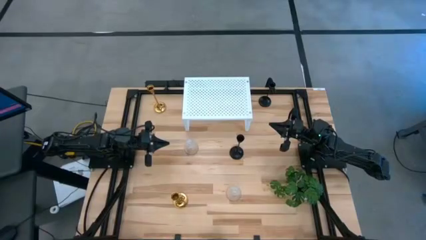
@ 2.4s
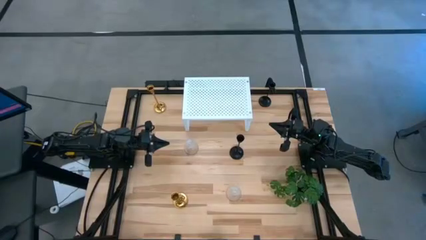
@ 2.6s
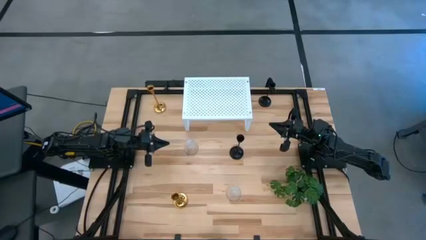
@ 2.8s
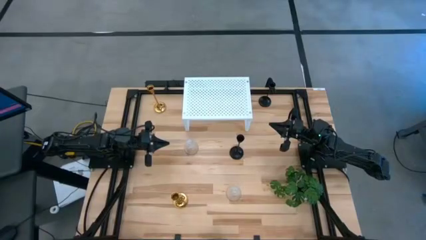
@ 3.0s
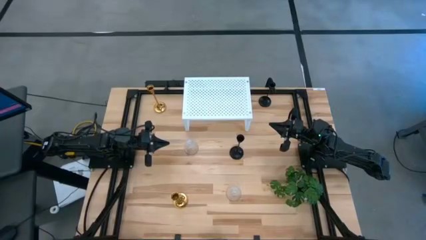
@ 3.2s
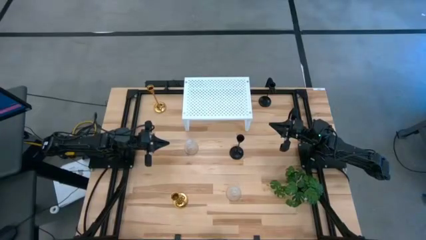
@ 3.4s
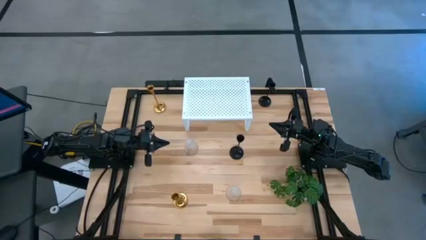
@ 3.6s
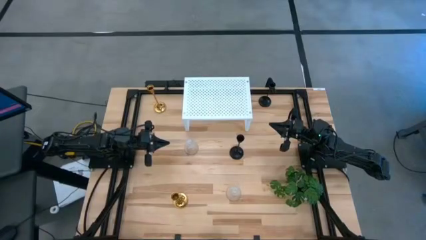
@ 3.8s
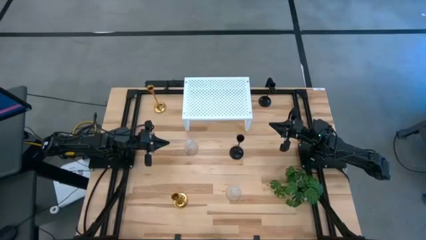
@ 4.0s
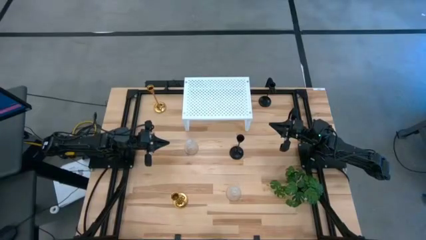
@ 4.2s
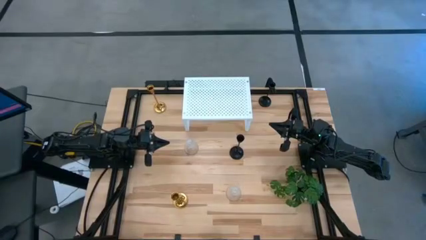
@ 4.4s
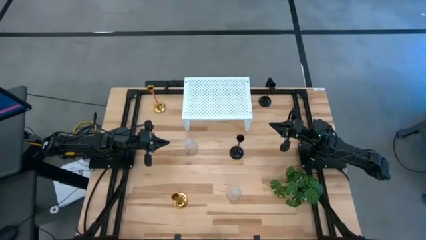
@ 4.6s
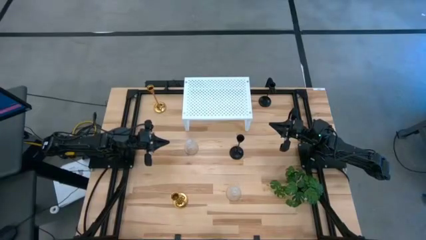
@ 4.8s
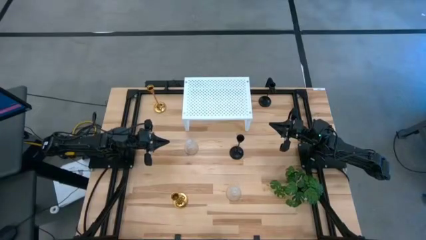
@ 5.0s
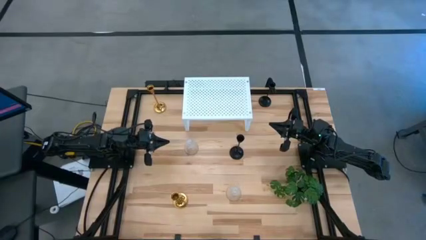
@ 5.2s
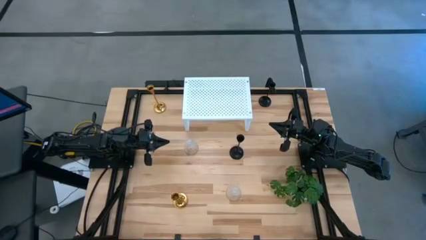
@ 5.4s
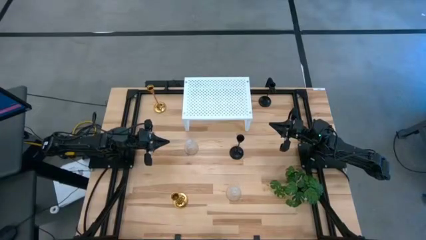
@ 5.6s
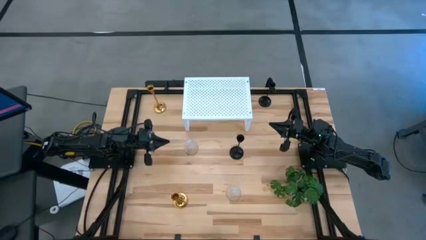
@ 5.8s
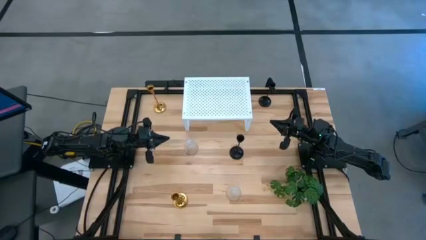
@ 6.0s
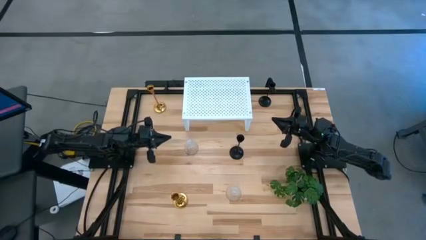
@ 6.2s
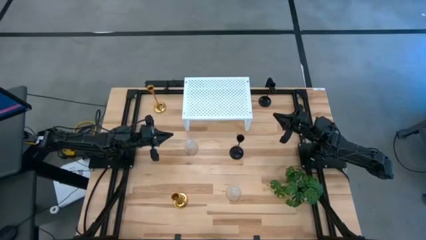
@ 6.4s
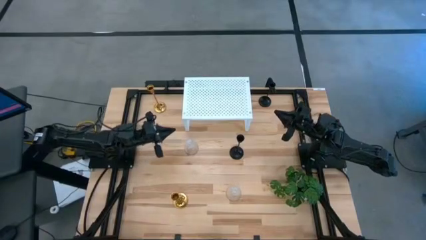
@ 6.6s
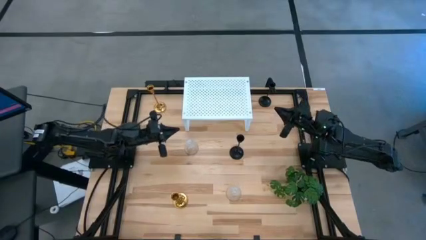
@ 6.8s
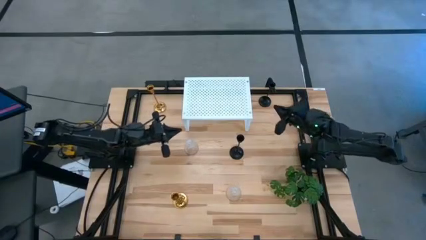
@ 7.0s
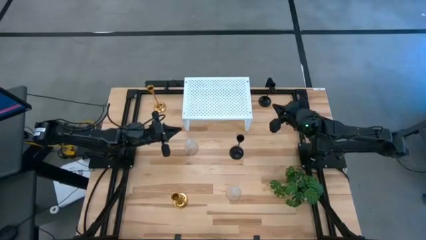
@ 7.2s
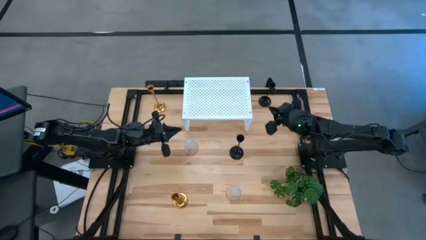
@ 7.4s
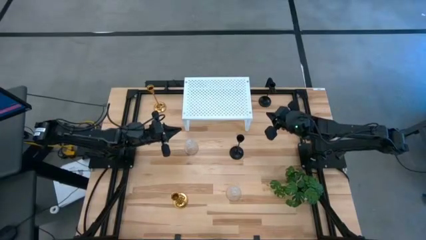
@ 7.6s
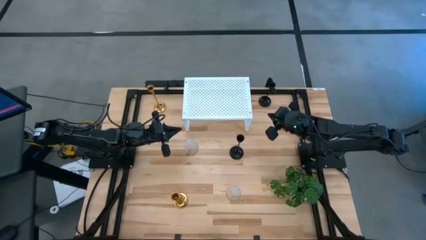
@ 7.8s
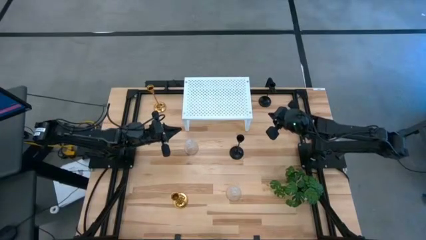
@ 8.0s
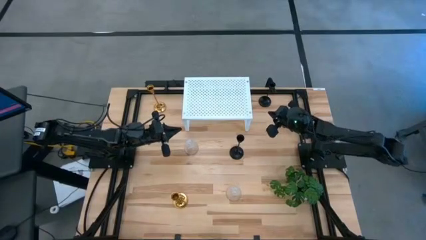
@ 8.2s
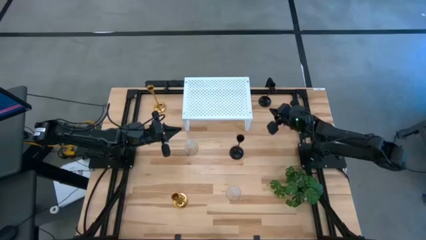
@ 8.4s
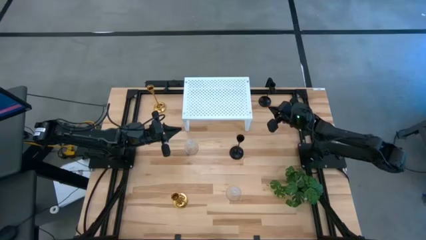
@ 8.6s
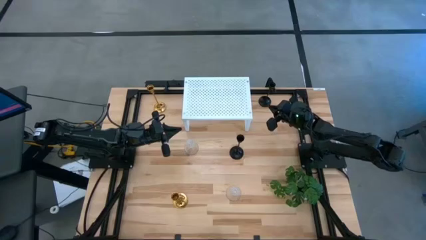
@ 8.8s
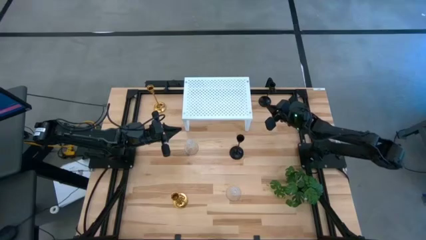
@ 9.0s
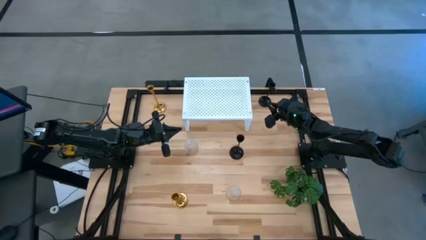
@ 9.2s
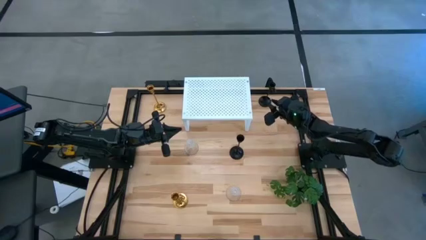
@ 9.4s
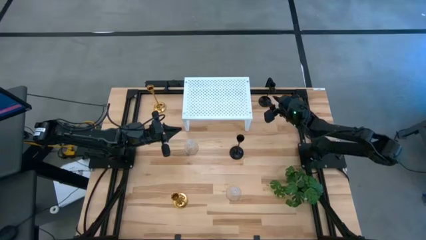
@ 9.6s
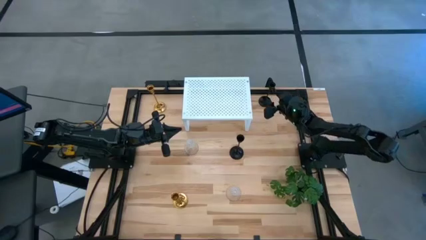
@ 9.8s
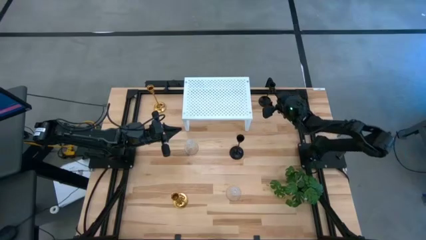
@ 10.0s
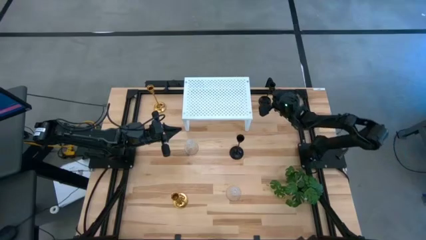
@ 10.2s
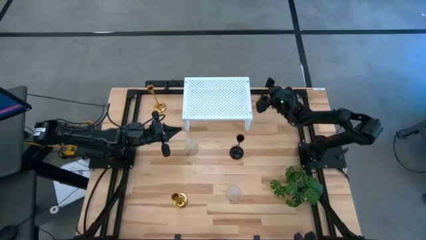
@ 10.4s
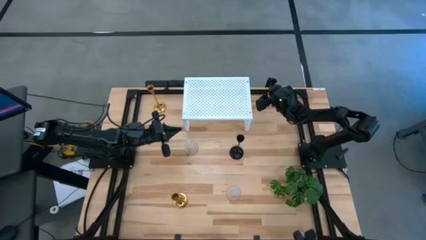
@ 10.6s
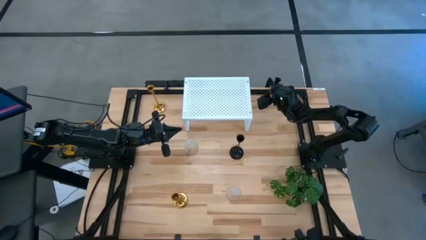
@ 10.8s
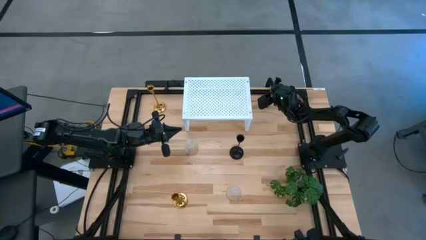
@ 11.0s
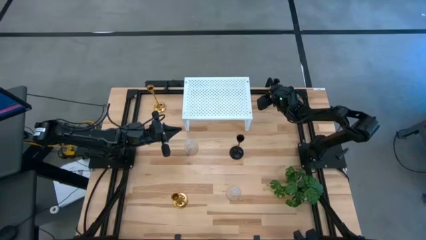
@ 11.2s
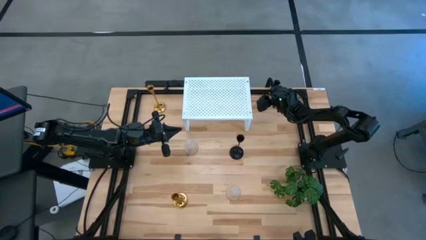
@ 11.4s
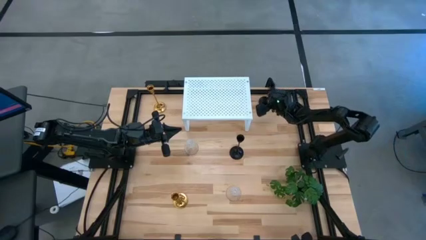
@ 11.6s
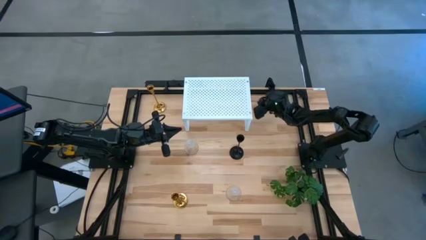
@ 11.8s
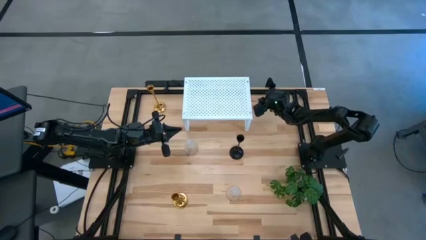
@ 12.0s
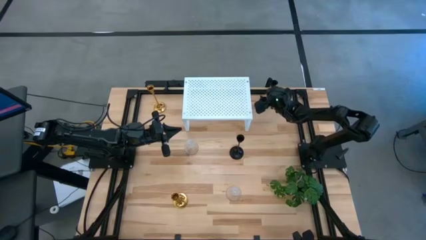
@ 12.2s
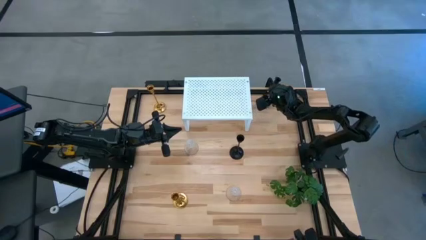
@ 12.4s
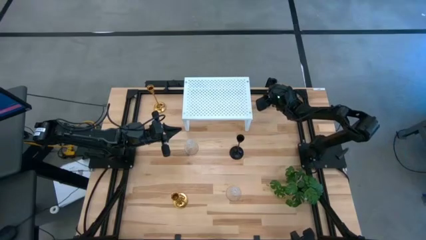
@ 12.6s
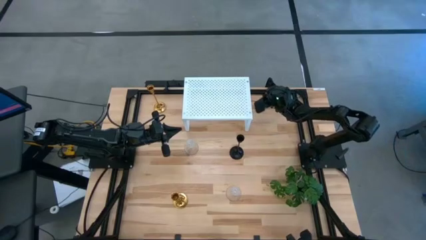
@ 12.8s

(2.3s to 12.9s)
Task: Pick & Place candle stick holders
Put the top black candle holder on the shelf

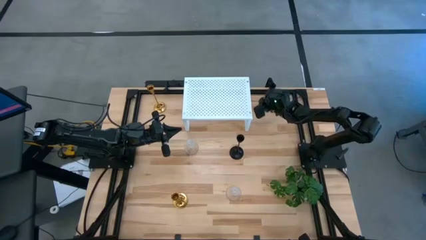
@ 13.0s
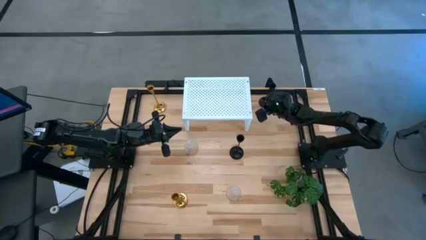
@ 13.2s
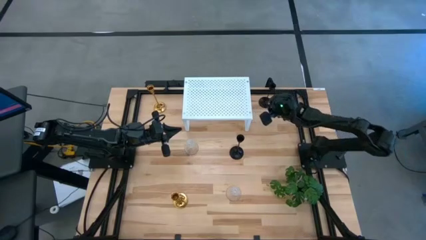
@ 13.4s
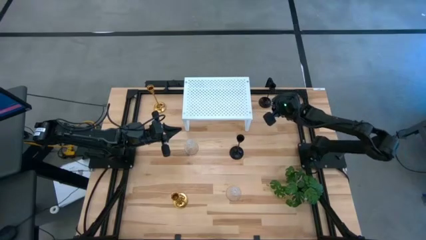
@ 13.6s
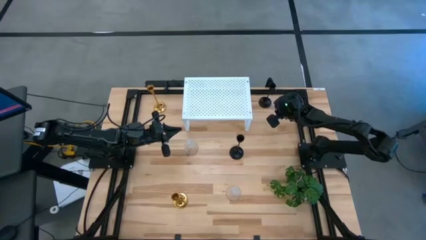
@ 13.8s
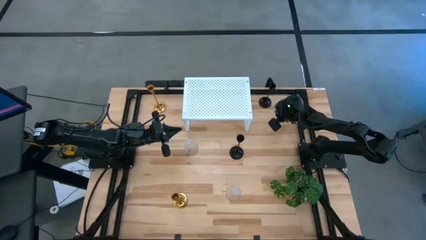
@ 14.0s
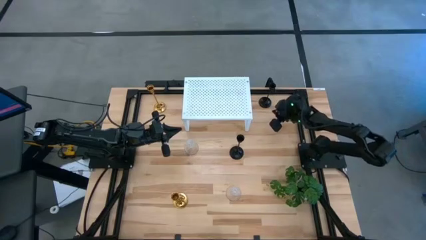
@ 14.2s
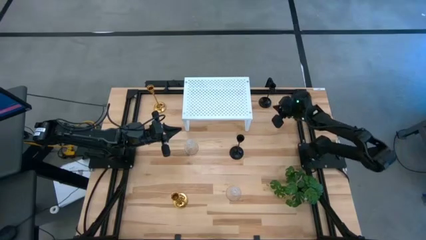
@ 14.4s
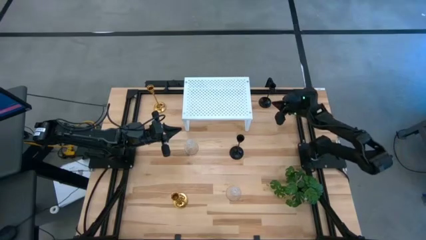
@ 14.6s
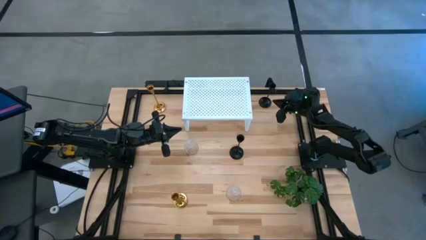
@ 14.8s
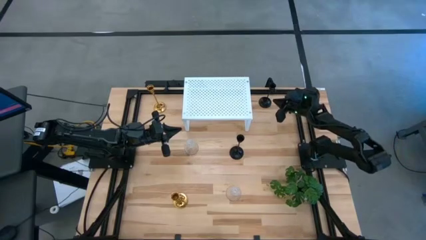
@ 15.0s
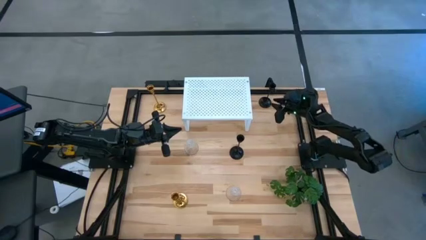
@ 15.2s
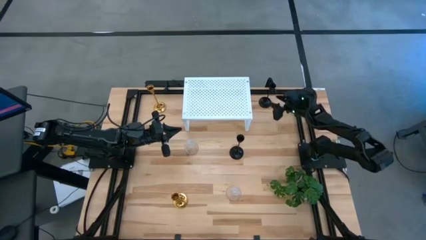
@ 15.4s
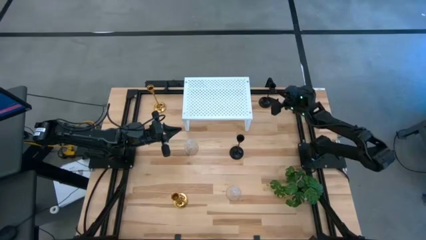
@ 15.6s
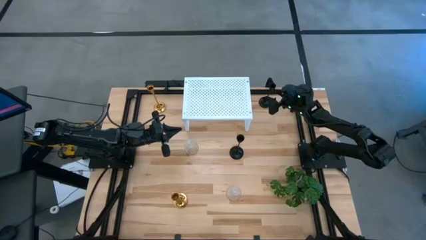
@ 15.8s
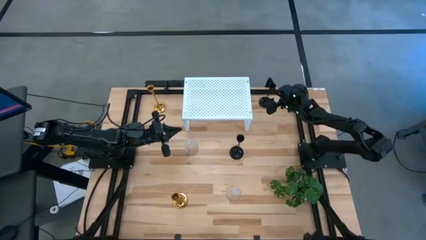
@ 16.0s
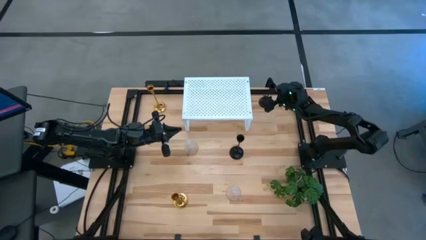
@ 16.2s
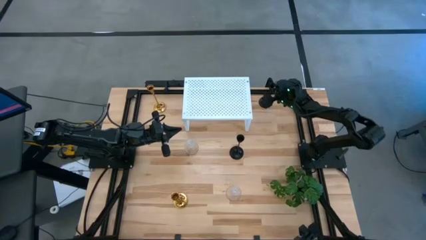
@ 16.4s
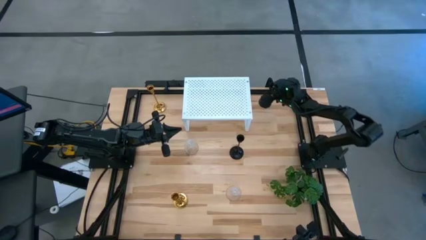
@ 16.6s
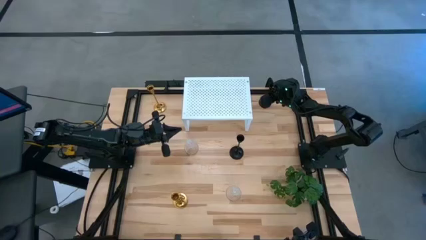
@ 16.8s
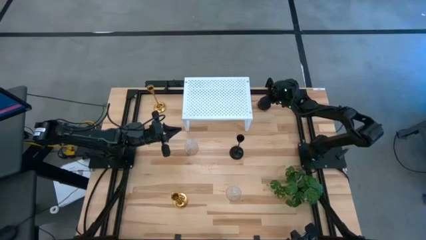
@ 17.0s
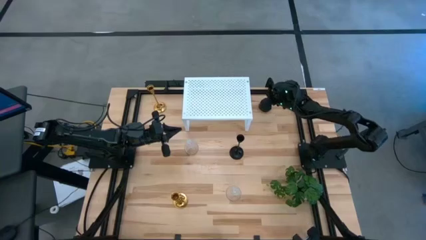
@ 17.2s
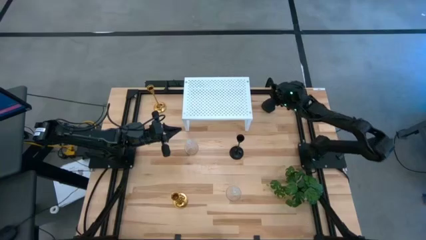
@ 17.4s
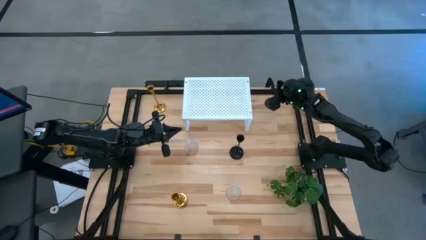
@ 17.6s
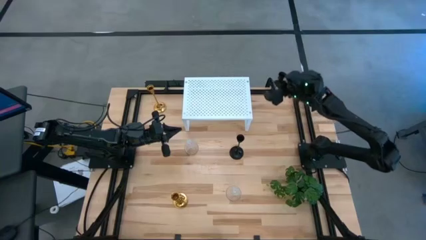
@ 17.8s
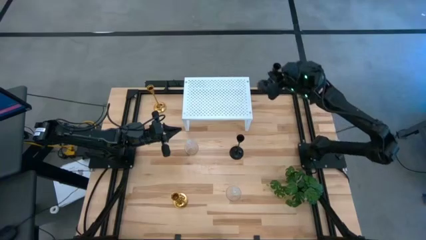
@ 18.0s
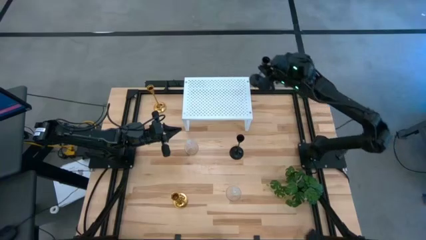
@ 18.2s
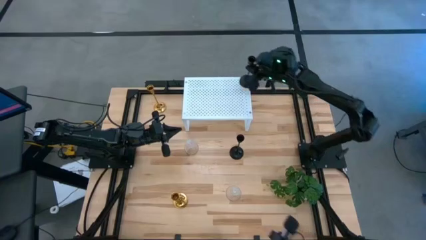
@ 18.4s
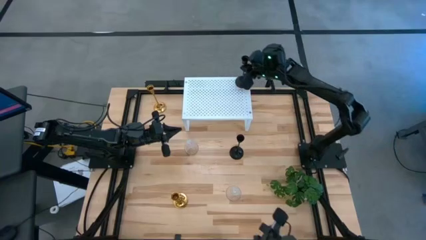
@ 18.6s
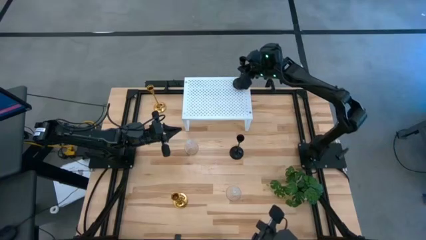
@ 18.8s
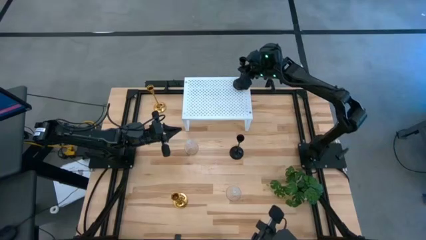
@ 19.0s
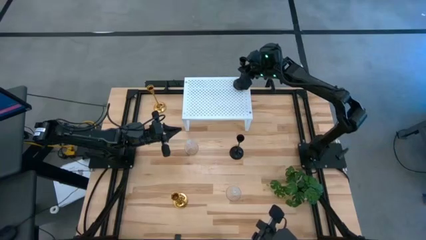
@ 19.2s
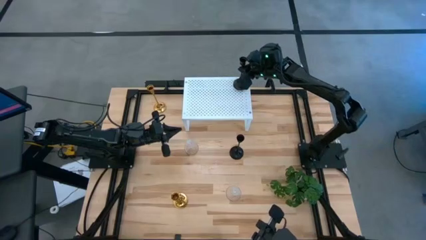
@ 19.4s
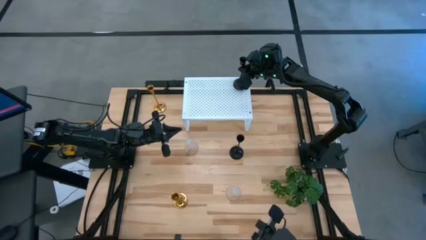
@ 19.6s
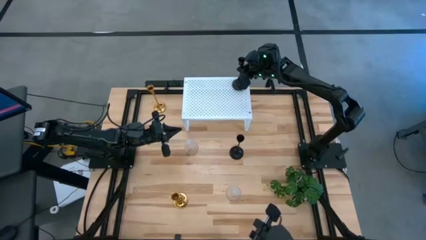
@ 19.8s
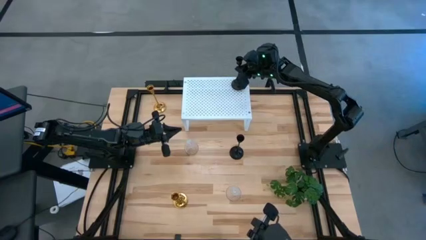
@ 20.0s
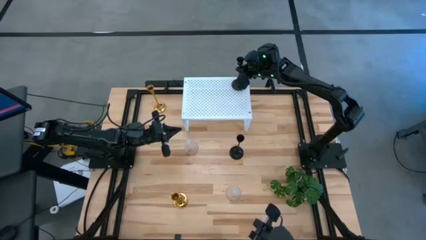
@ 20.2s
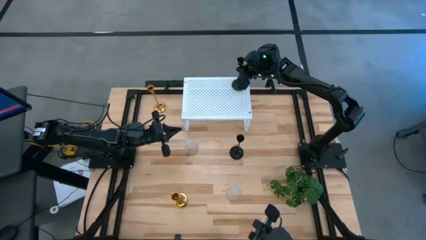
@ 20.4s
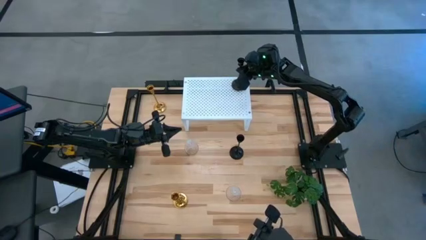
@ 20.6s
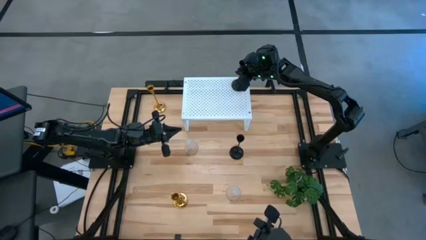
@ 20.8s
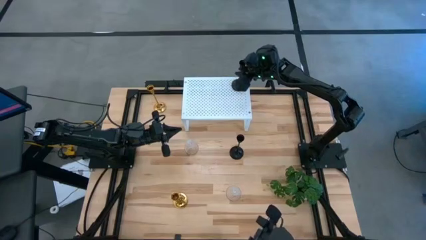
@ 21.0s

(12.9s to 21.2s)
Put the top black candle holder on the shelf
